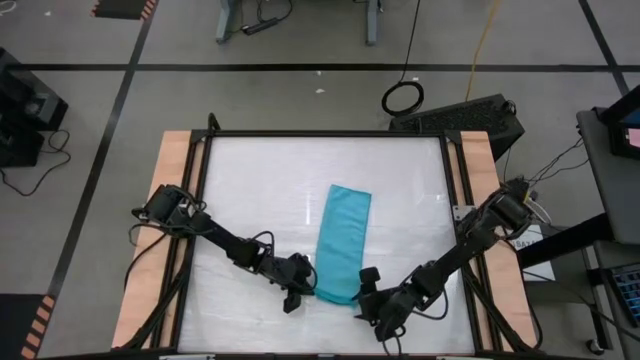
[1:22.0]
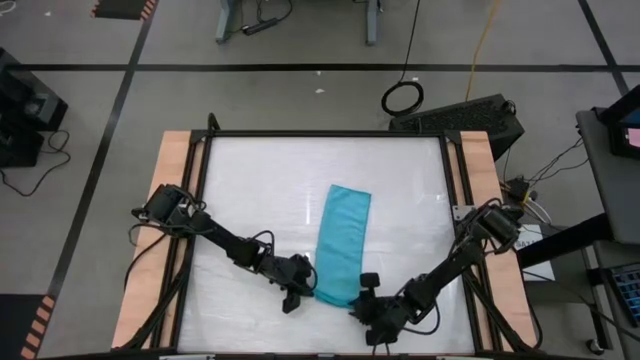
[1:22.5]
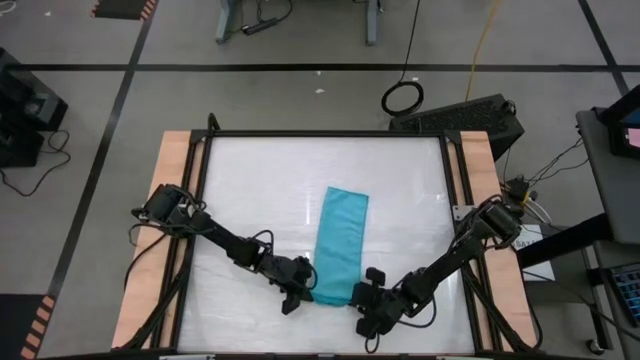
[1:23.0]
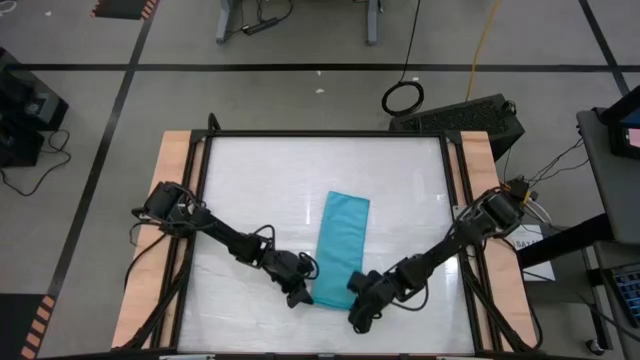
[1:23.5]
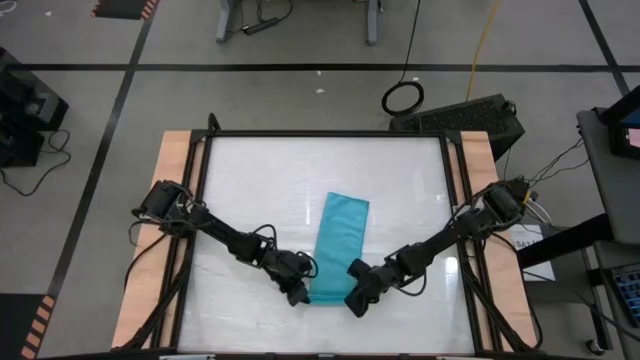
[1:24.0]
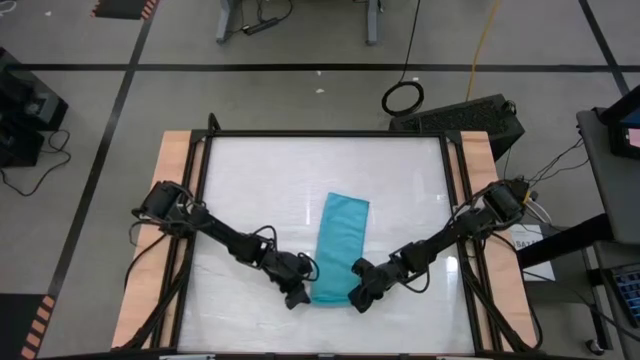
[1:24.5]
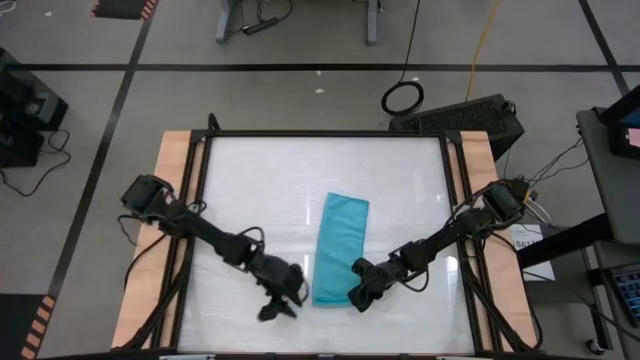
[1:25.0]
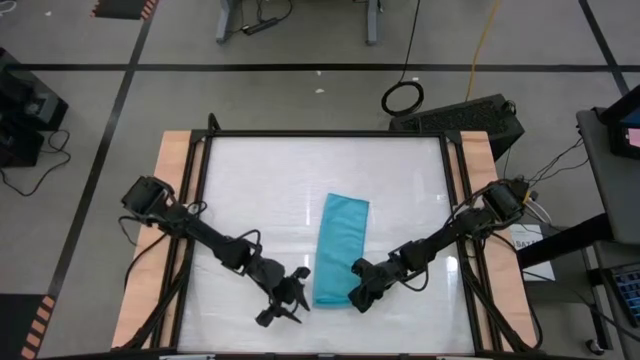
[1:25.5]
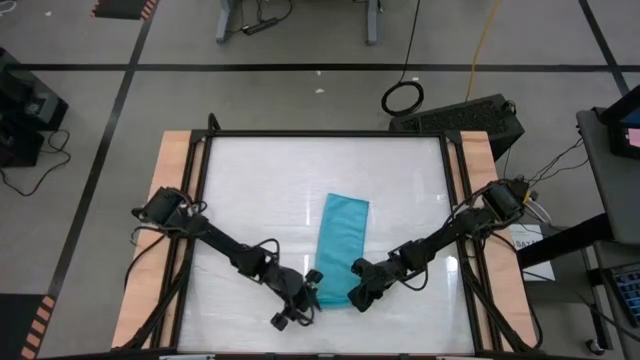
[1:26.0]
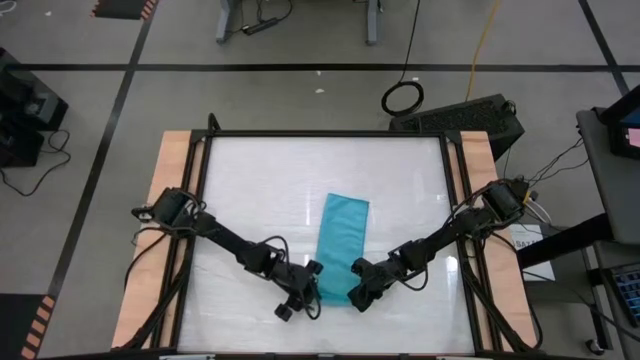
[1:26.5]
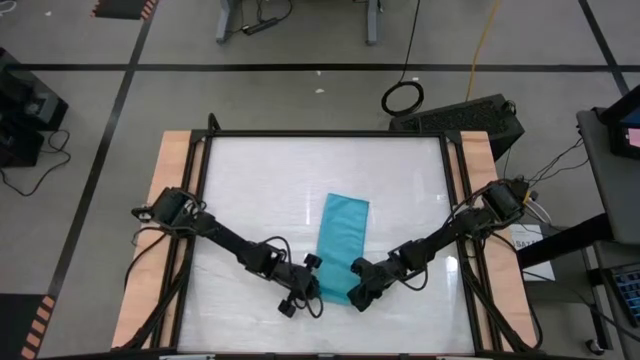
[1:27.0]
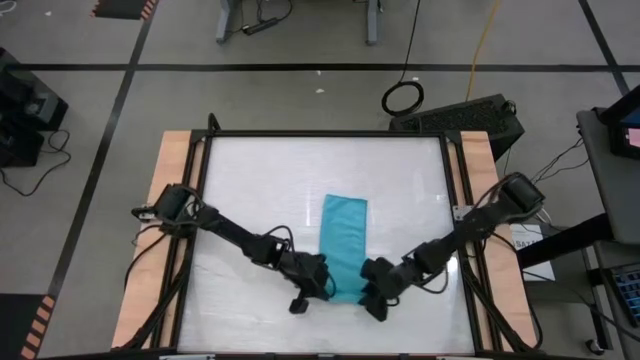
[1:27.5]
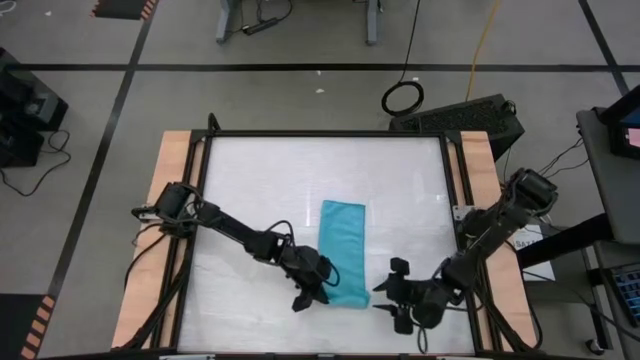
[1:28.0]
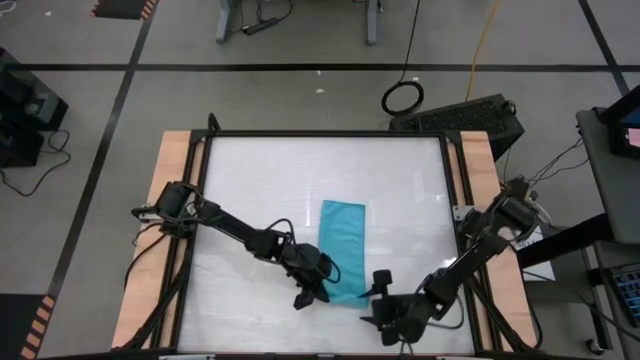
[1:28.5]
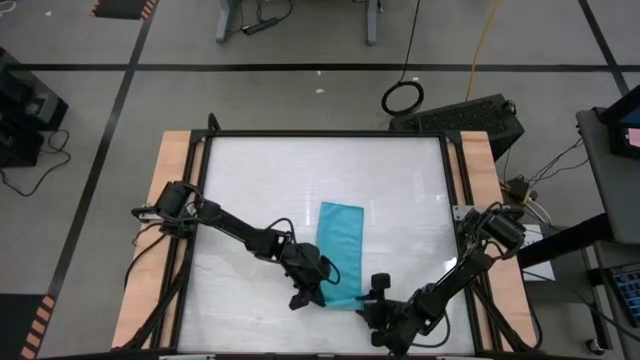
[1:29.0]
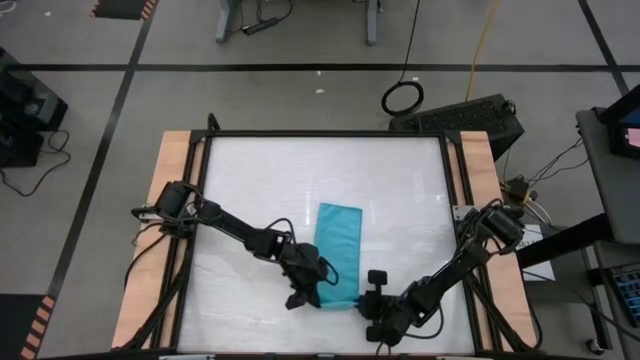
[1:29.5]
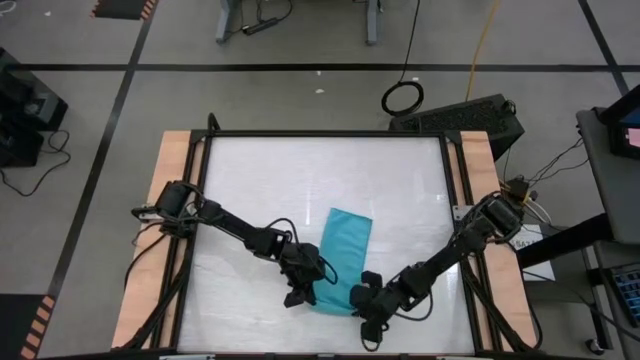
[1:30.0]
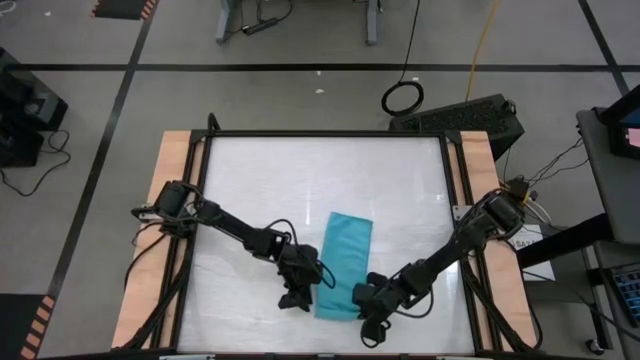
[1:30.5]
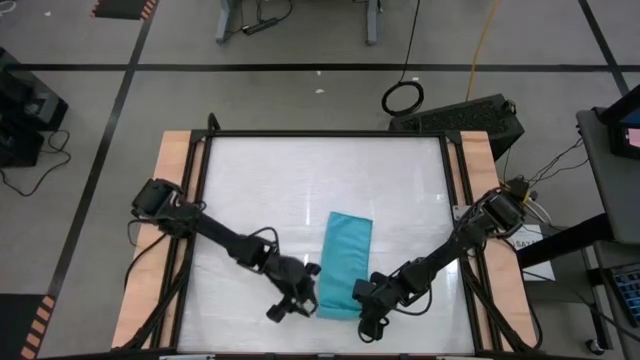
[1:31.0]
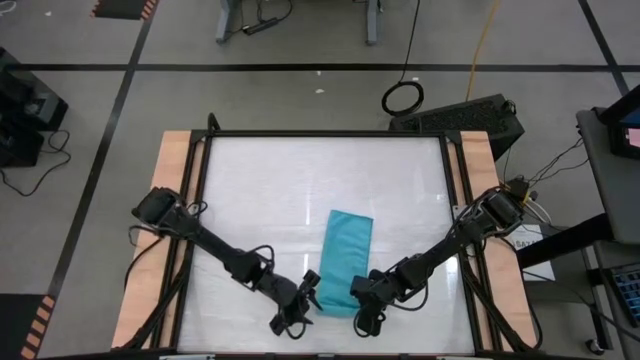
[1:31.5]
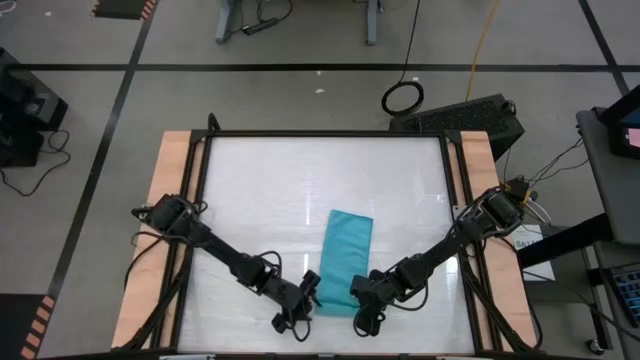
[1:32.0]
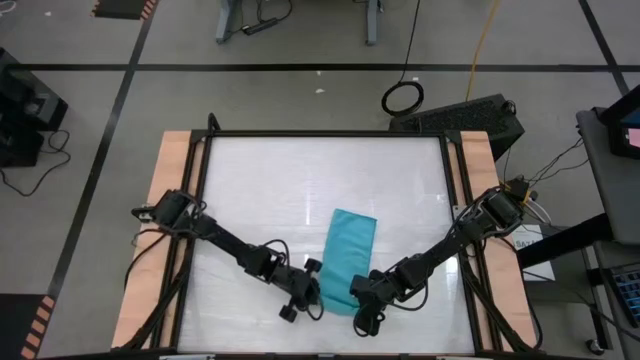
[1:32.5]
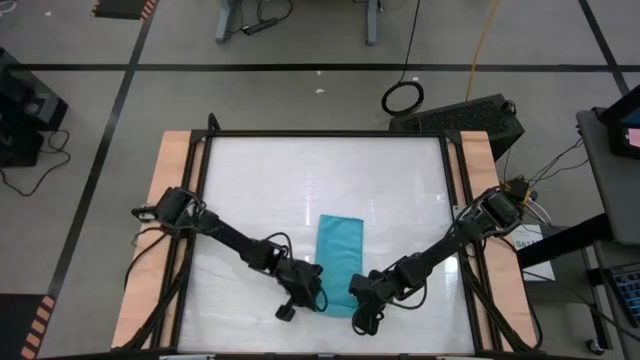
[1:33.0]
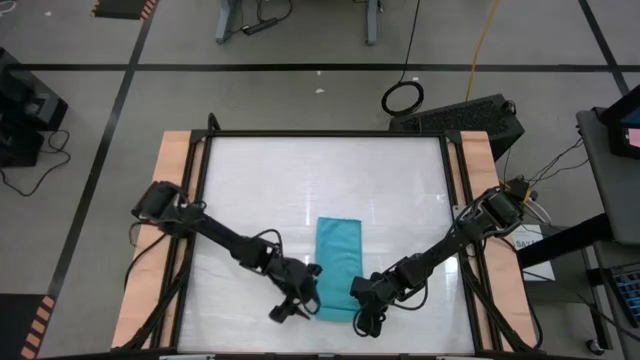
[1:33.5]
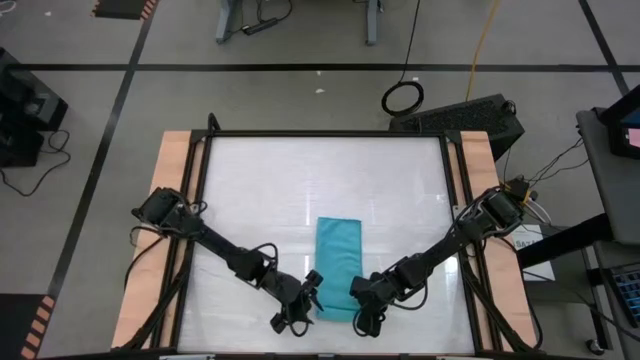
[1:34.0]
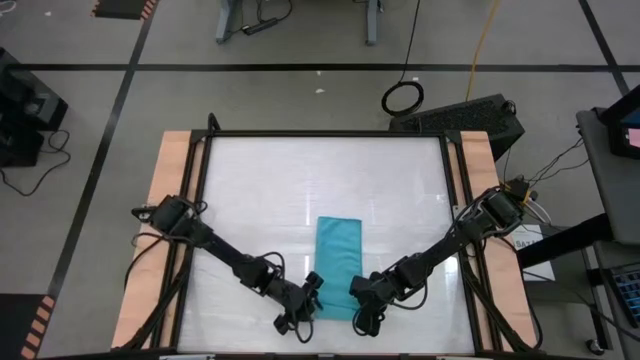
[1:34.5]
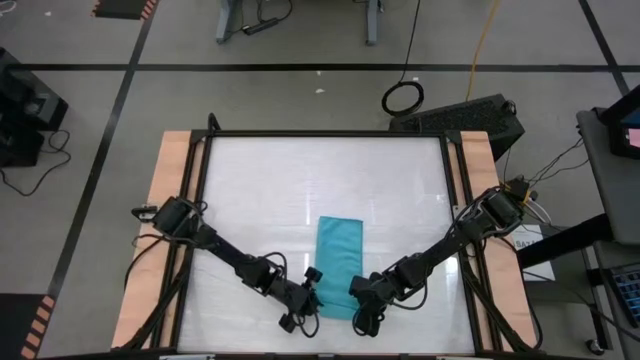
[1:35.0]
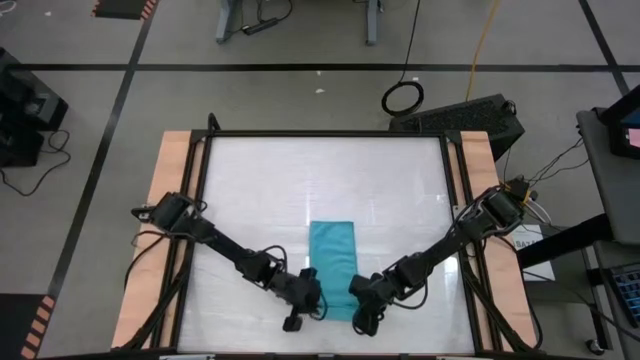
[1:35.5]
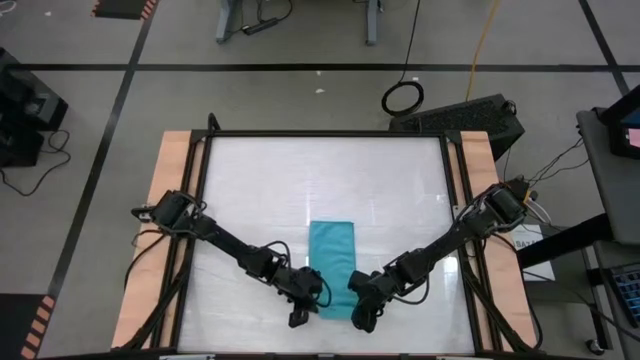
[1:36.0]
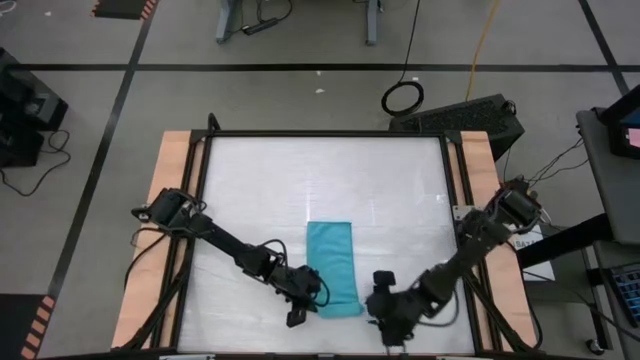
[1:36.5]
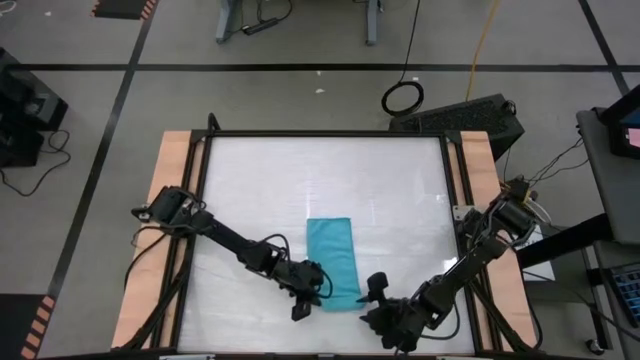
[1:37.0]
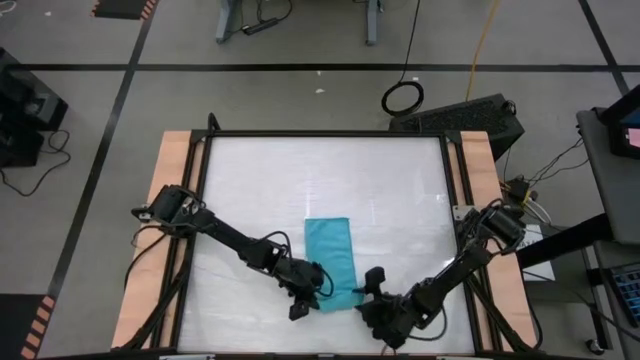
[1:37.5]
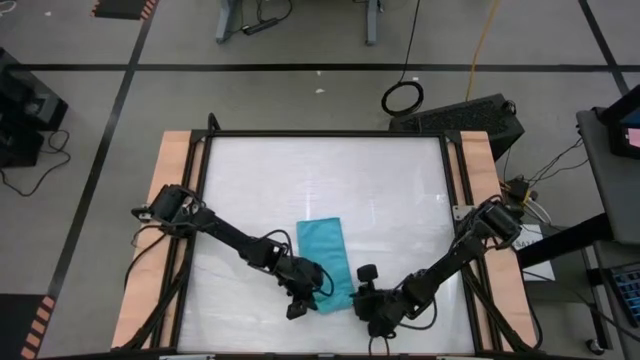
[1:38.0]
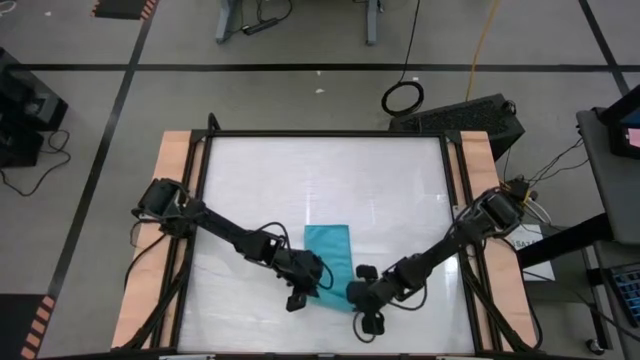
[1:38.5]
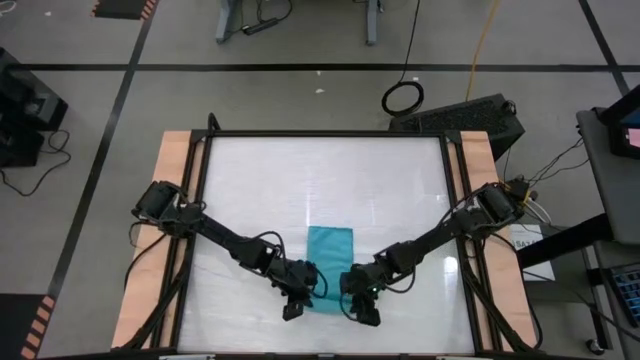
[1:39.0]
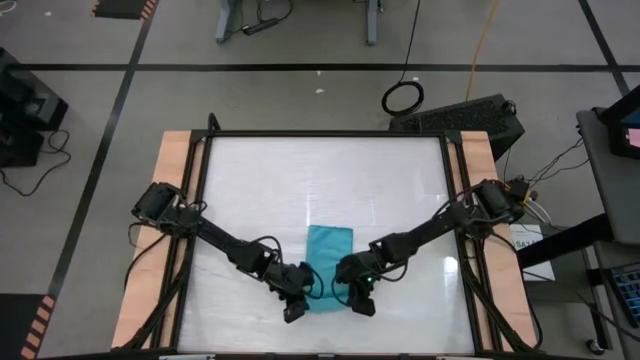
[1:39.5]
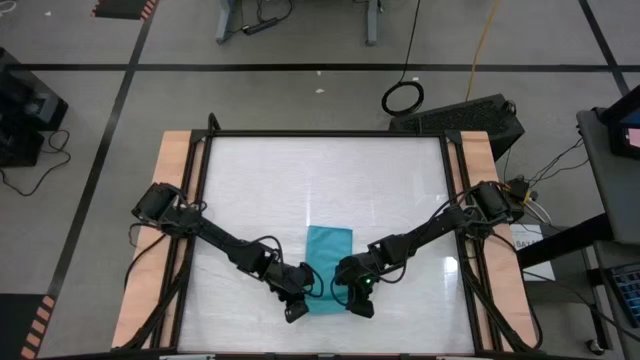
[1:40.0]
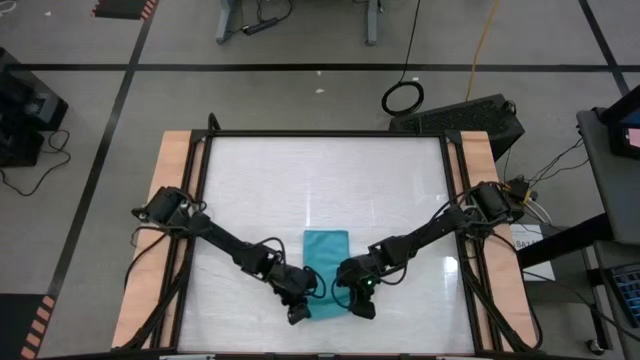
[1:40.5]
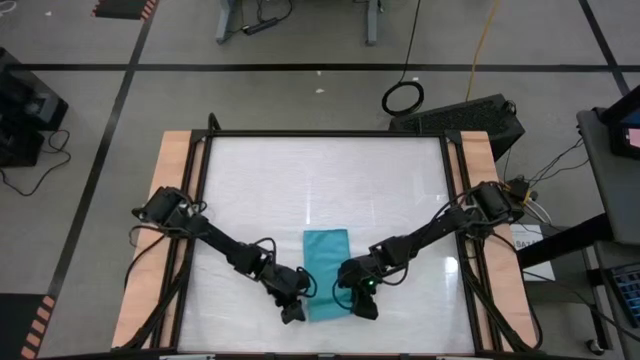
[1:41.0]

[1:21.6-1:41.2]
Task: Roll towel
Roll the blue microfiber towel

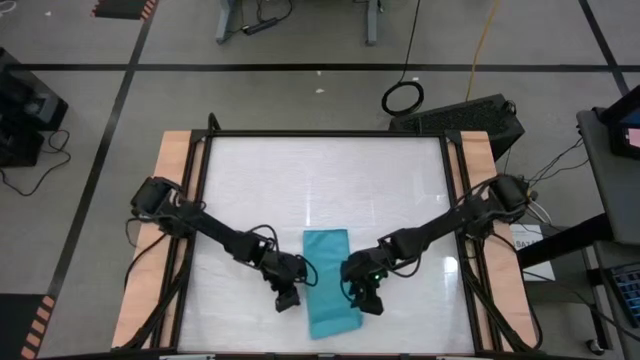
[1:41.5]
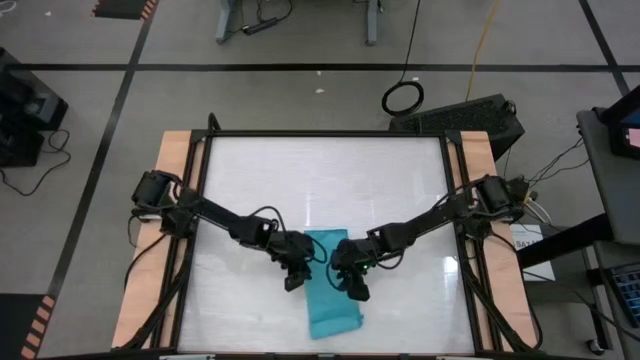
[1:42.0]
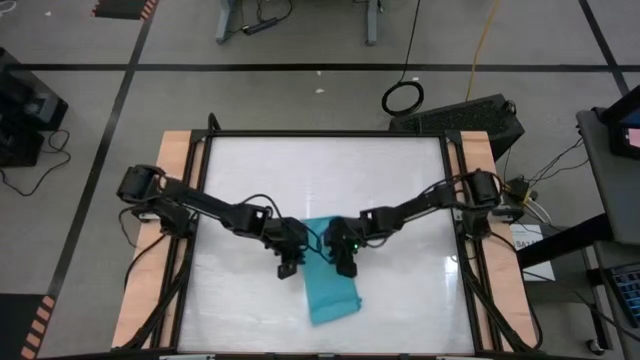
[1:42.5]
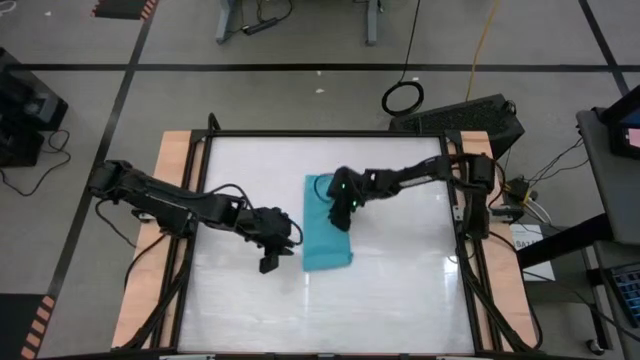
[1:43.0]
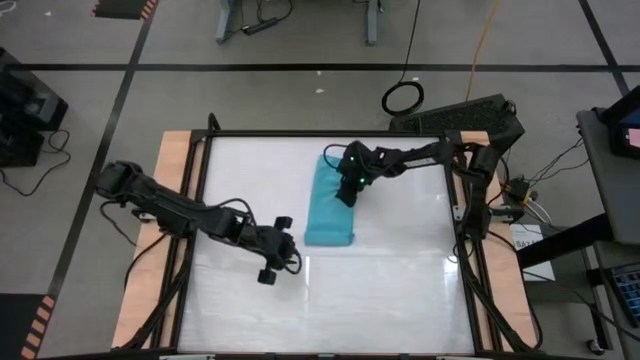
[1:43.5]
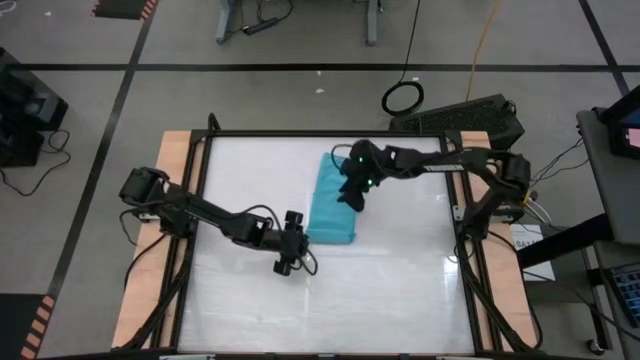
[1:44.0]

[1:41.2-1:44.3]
Roll the blue microfiber towel
